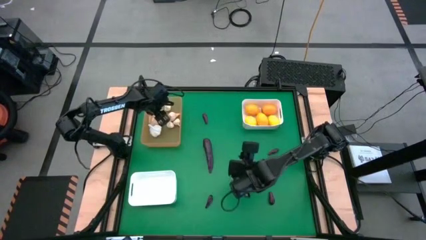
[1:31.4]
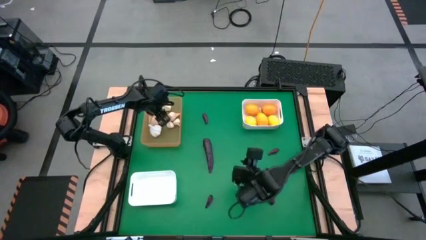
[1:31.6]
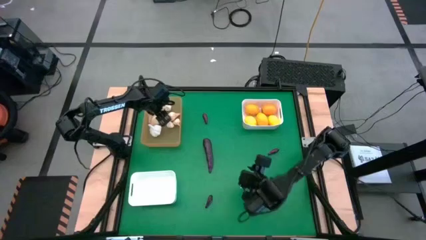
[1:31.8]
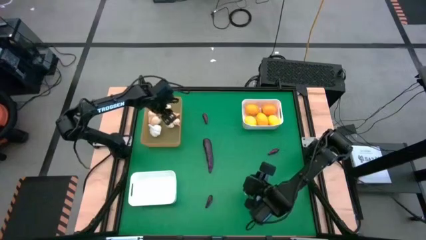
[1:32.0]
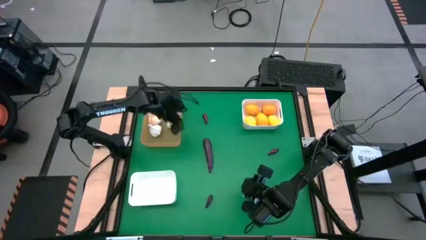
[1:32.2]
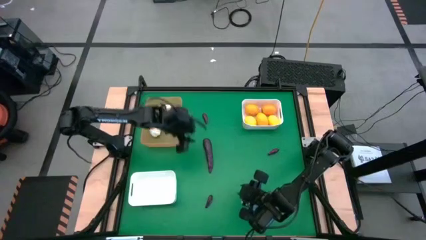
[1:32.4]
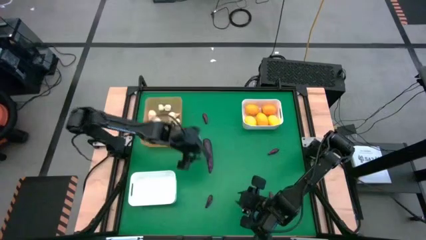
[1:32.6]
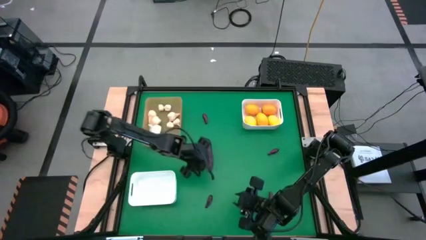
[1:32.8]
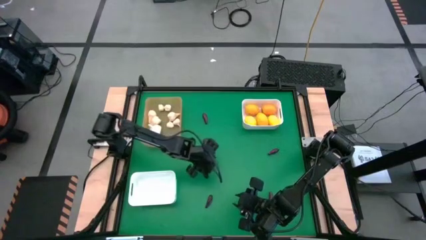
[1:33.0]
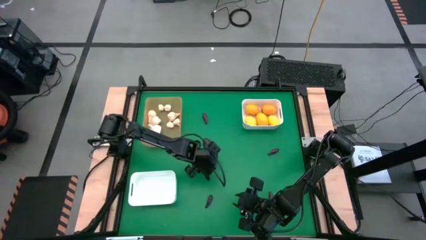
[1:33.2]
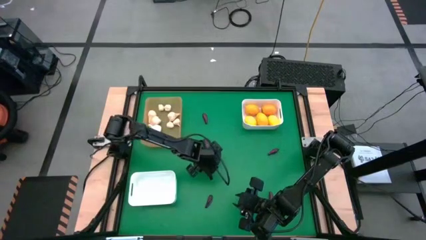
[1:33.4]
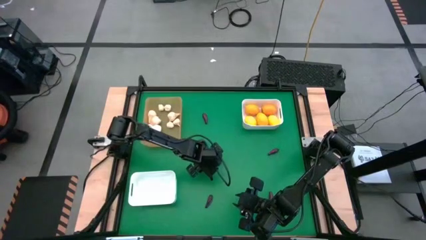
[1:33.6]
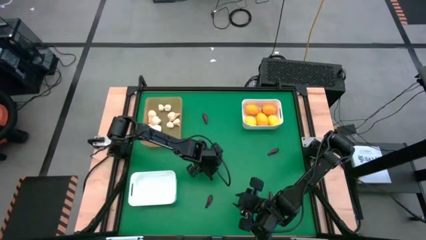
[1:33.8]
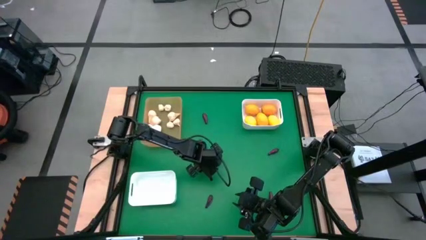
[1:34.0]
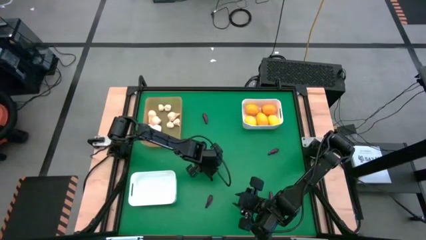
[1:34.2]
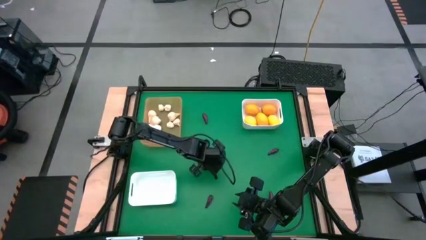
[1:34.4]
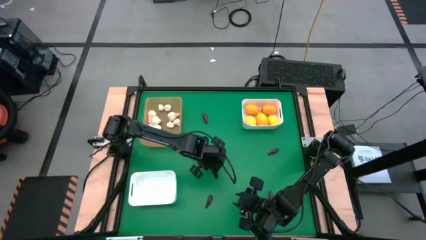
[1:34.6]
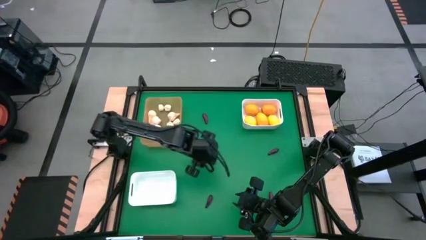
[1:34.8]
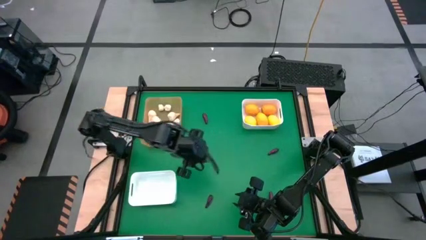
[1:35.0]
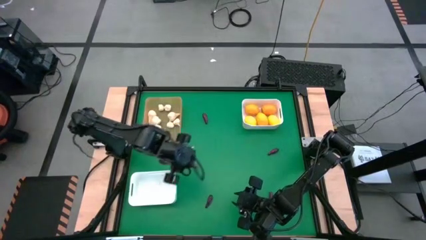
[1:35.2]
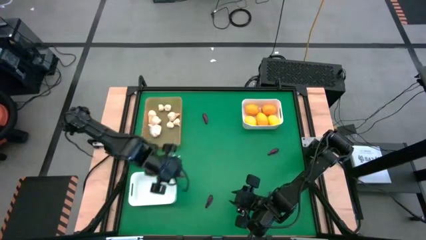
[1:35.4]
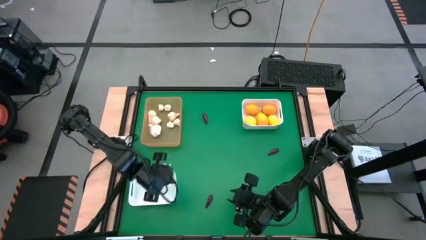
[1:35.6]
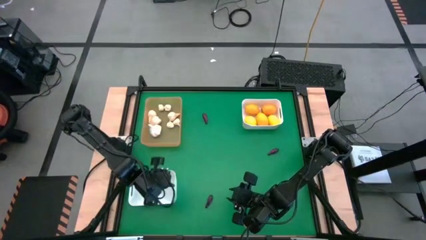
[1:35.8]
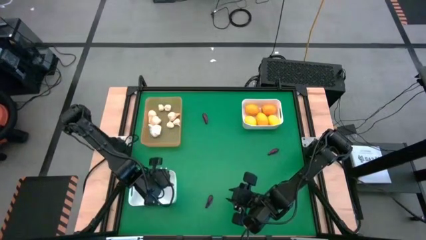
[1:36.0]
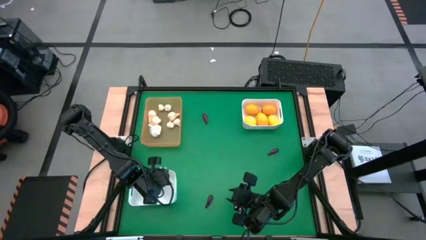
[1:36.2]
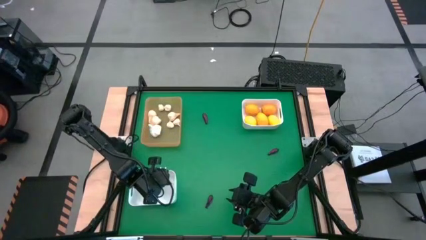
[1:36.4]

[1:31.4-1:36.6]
Task: Sort produce into baskets
Put the eggplant into the bottom white bin

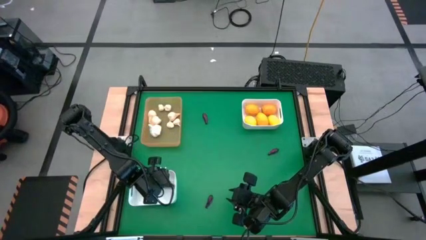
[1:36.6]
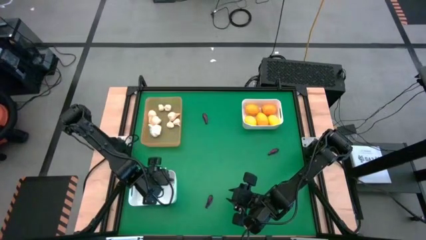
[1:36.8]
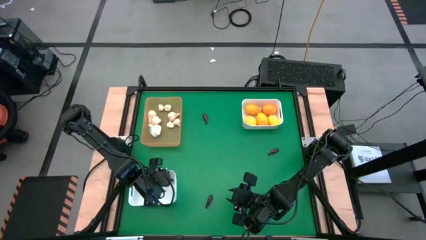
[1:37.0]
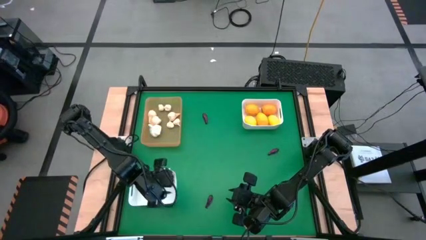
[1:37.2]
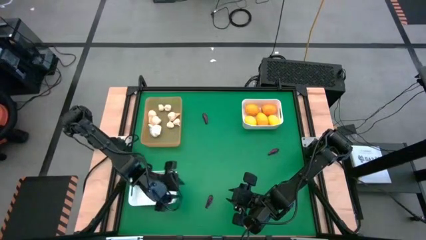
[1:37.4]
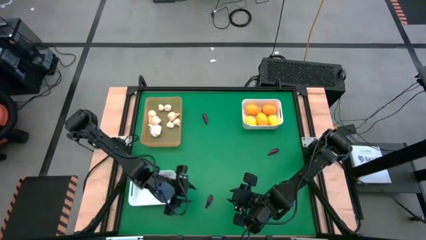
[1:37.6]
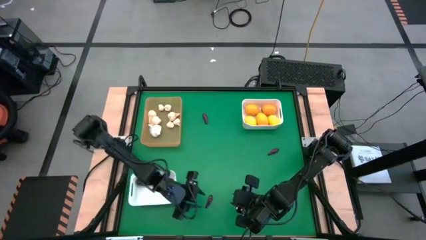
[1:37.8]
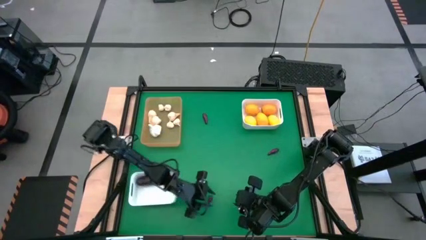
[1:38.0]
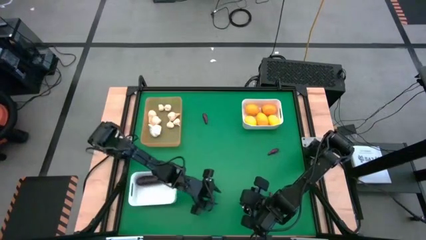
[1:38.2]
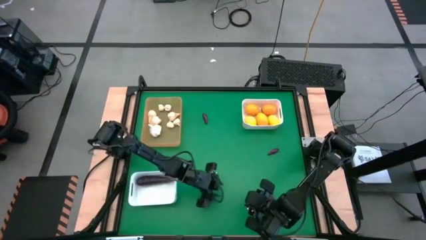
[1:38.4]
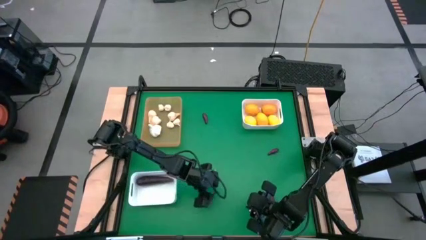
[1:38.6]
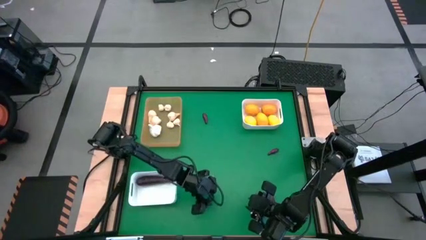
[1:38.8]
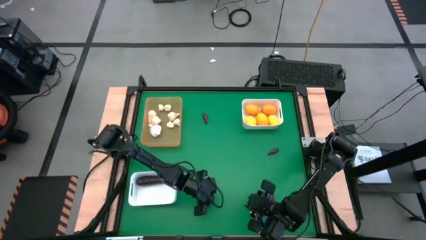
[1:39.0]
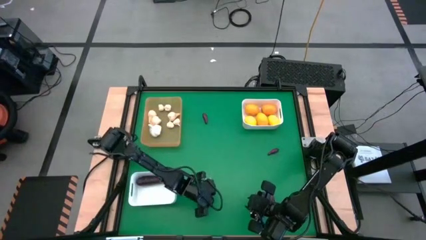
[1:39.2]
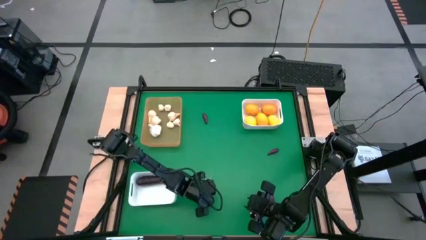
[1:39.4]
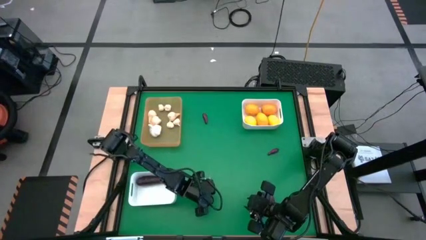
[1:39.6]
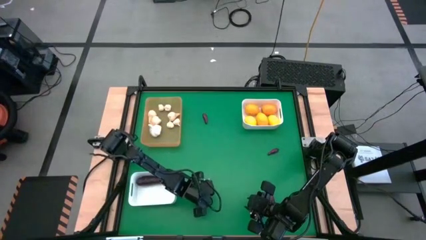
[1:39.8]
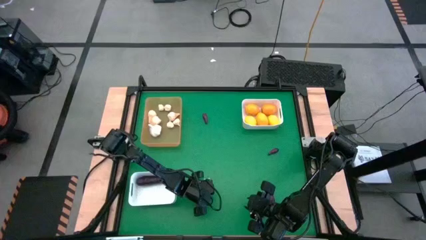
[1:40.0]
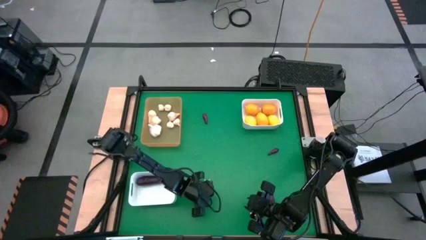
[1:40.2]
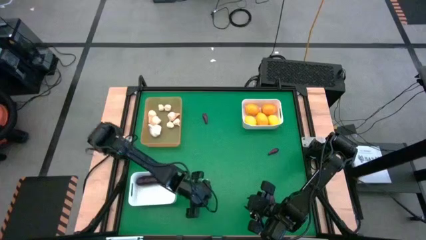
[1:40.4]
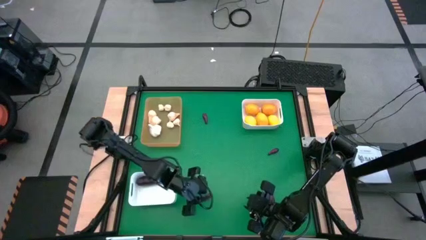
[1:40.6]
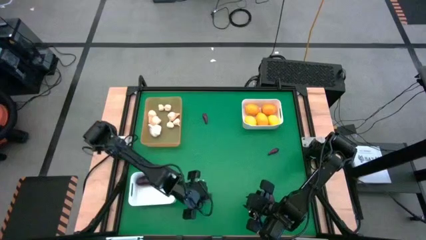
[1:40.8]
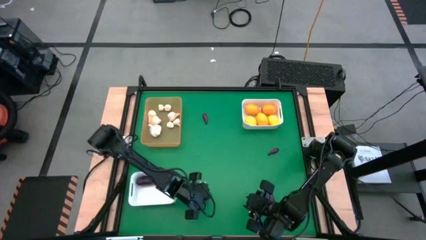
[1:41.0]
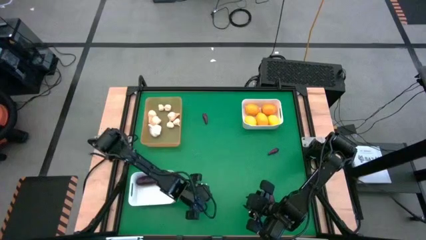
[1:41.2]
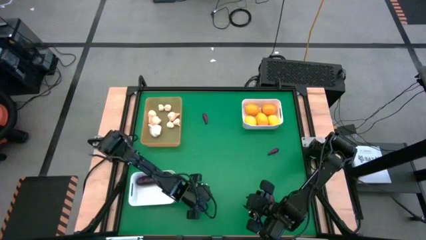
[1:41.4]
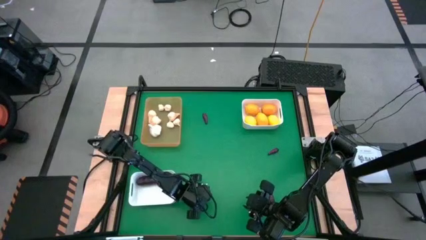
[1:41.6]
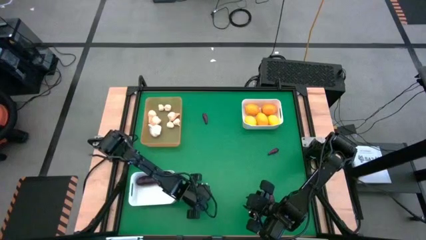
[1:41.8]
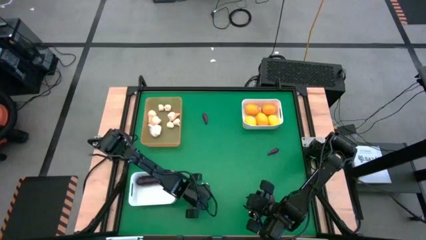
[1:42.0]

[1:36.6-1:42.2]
Put the eggplant into the bottom white bin

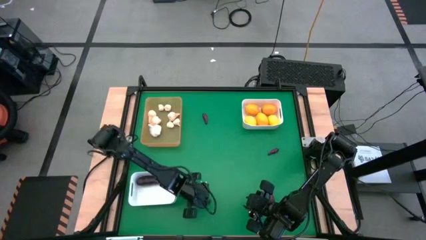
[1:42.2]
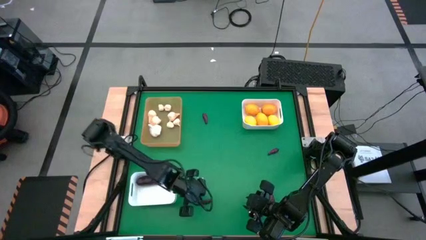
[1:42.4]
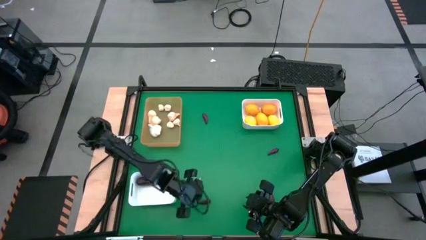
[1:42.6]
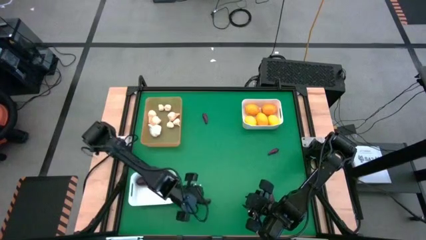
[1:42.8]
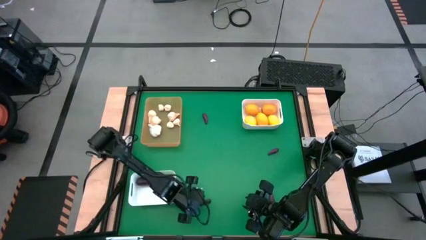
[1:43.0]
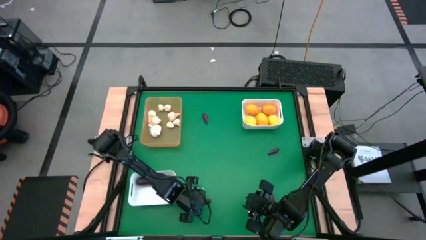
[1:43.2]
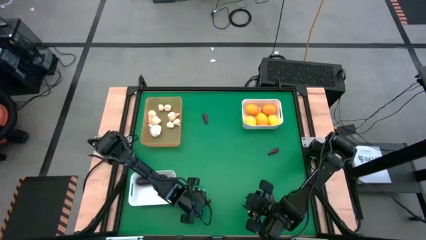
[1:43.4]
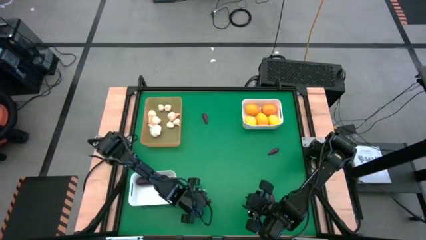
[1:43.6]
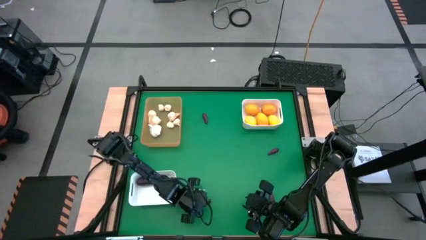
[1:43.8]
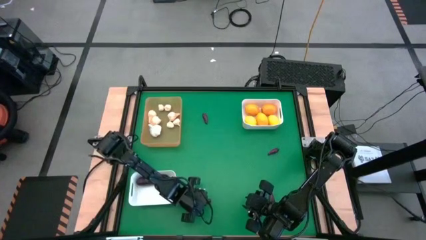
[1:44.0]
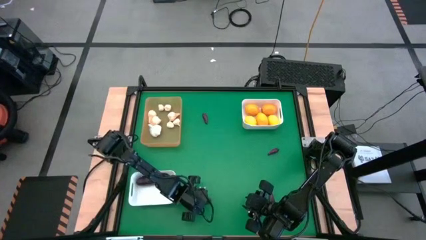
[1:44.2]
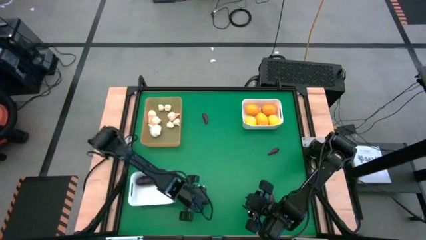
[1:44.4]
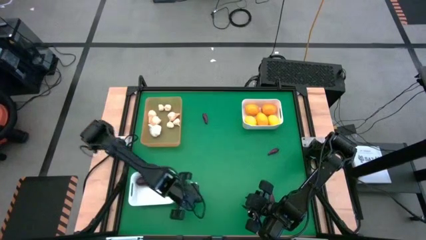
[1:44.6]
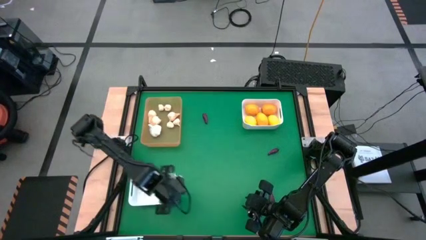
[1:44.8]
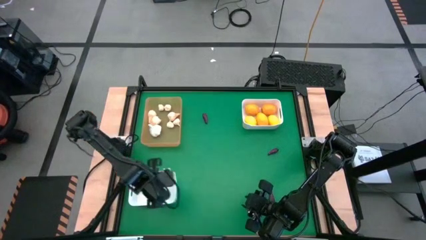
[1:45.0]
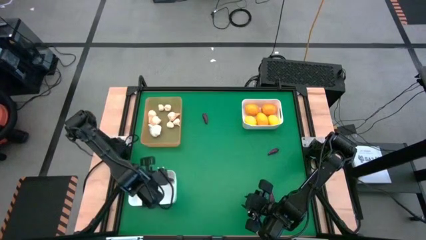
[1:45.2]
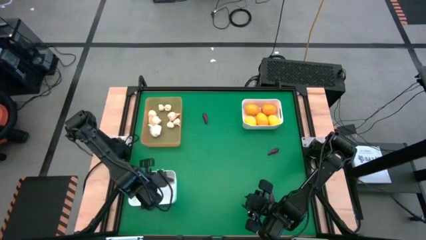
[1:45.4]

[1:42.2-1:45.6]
Put the eggplant into the bottom white bin

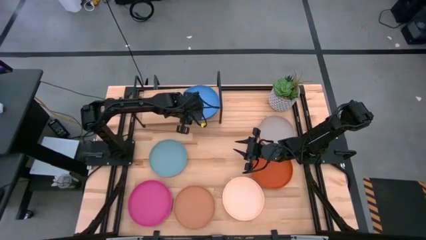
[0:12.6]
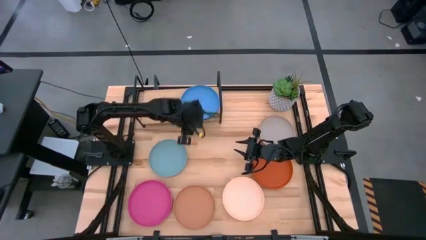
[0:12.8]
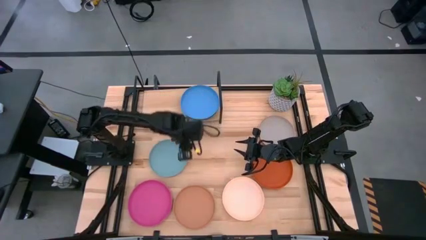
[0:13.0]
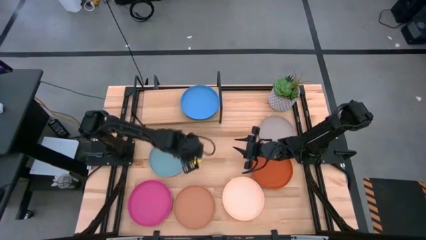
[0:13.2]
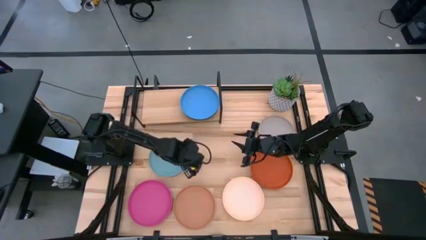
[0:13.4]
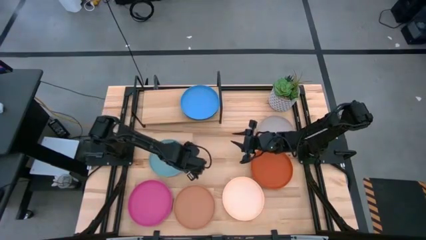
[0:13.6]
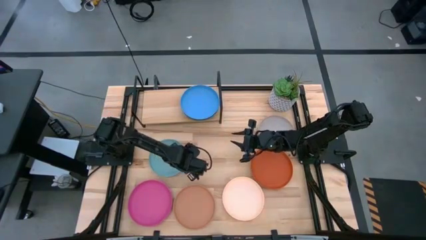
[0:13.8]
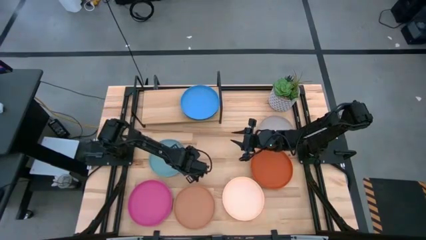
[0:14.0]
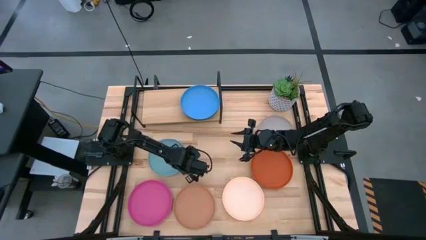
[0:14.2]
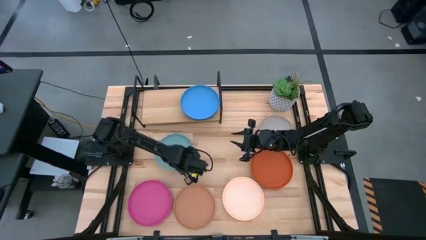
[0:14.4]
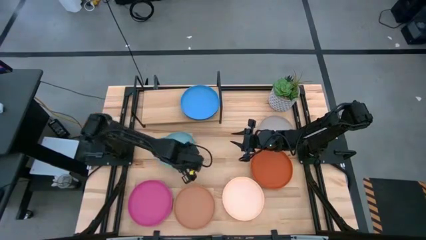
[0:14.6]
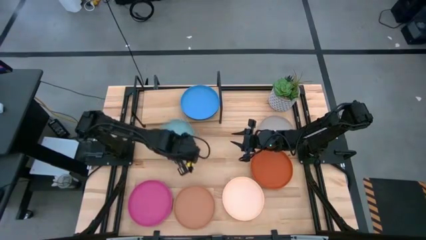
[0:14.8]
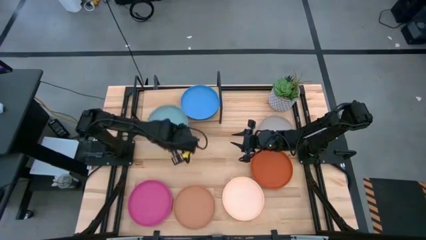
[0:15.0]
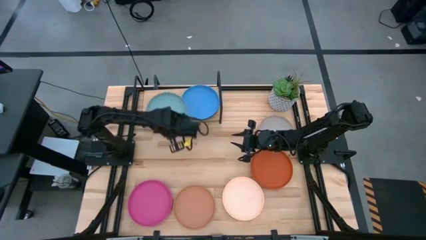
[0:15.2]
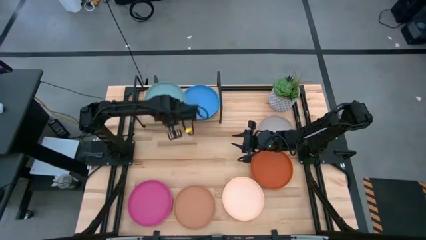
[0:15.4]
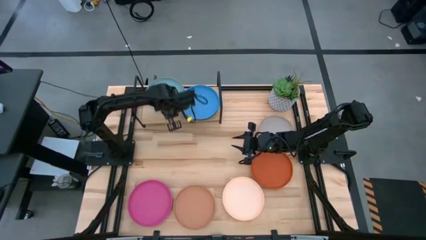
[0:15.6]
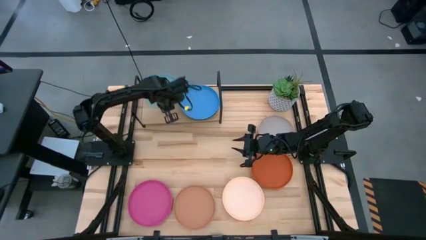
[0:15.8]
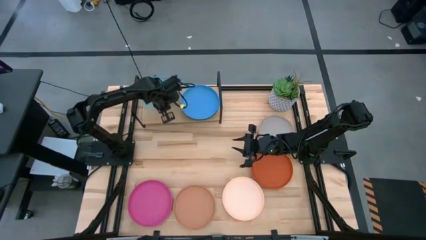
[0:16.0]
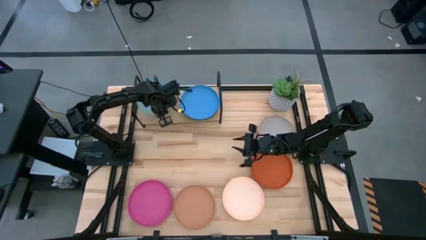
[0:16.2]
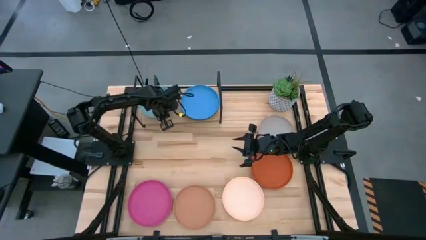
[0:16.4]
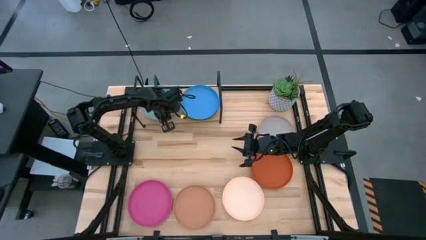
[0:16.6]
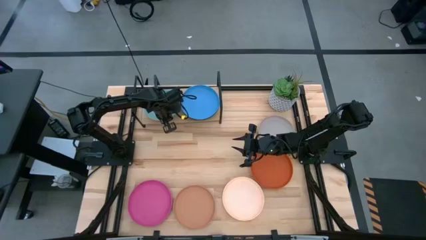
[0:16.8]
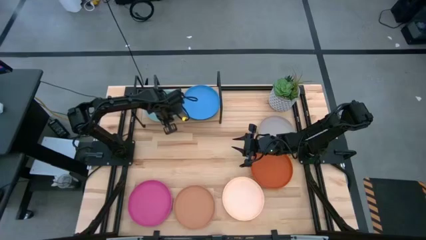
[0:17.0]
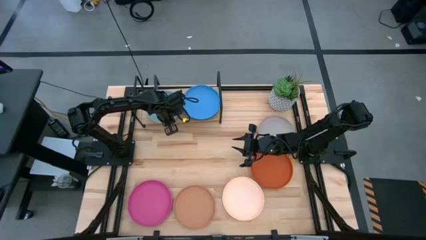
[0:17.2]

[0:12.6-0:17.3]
Task: Place and stack plates onto a shelf
Put the light blue plate on the shelf
